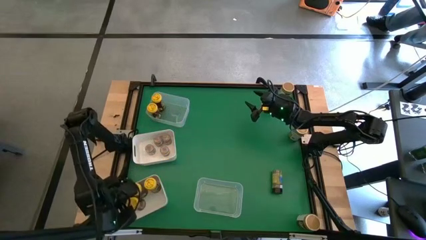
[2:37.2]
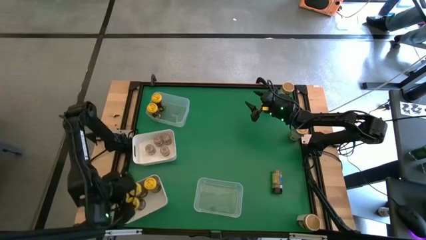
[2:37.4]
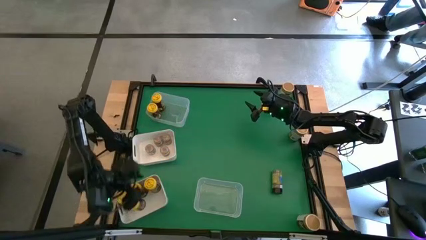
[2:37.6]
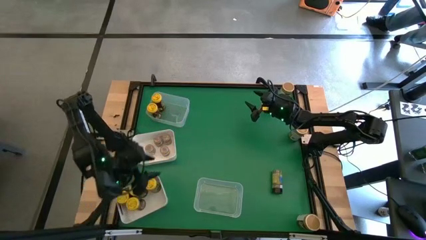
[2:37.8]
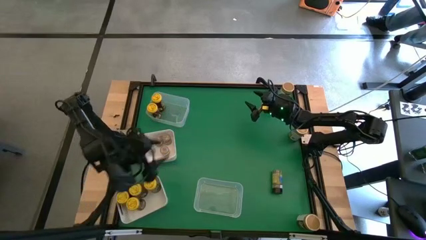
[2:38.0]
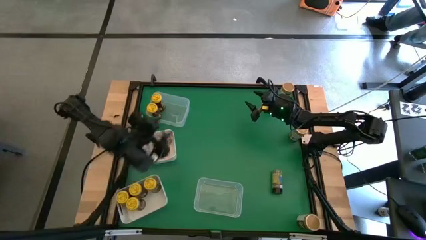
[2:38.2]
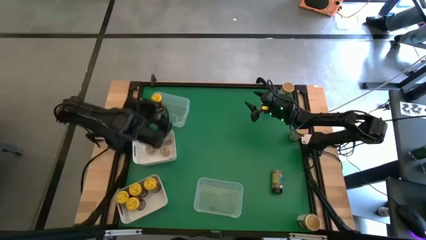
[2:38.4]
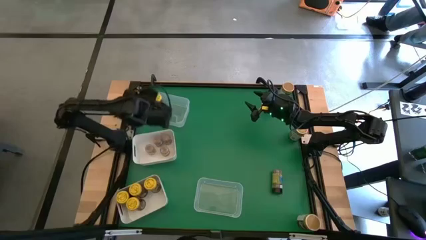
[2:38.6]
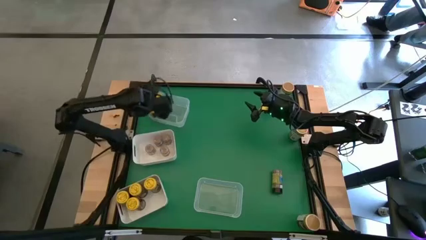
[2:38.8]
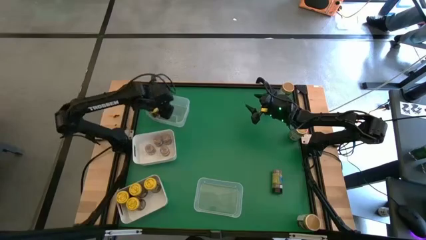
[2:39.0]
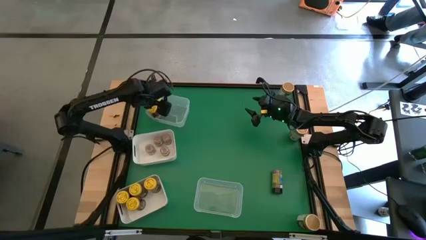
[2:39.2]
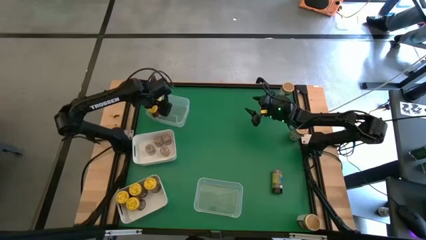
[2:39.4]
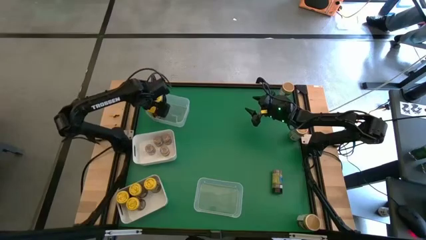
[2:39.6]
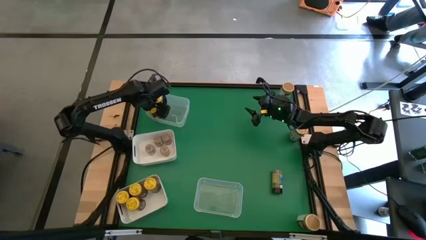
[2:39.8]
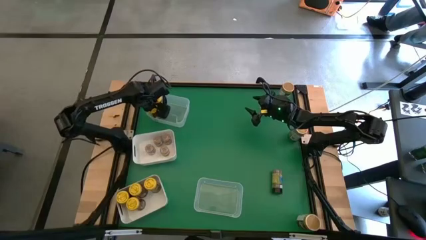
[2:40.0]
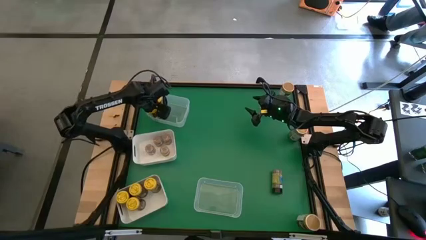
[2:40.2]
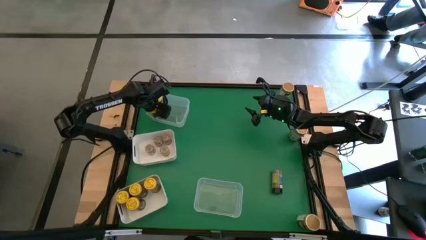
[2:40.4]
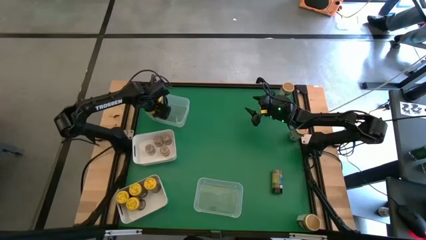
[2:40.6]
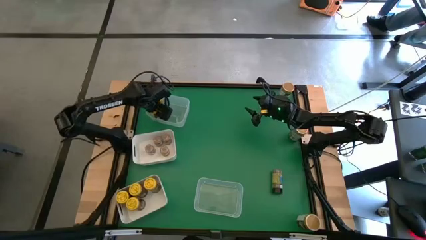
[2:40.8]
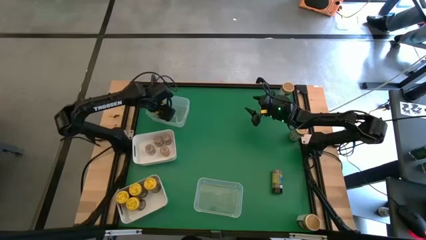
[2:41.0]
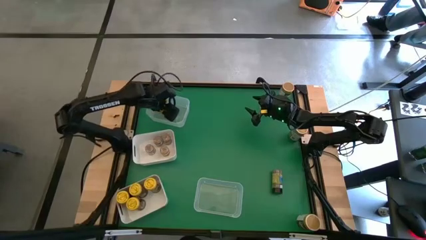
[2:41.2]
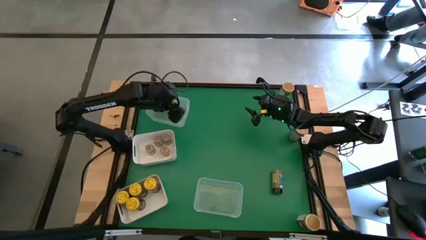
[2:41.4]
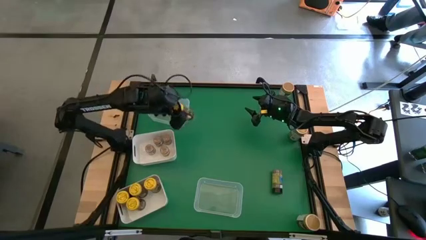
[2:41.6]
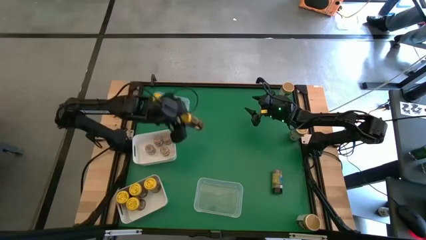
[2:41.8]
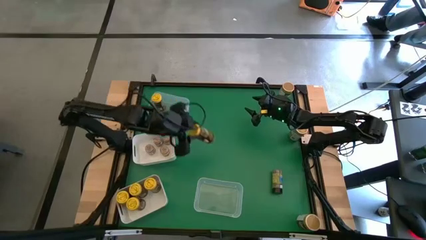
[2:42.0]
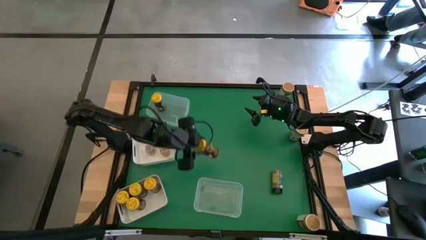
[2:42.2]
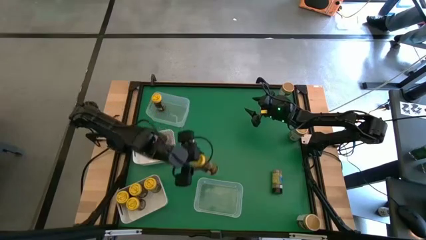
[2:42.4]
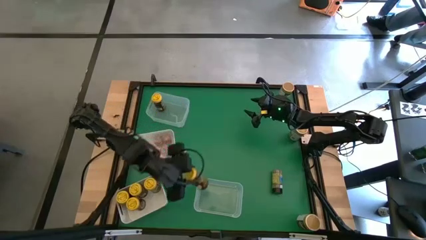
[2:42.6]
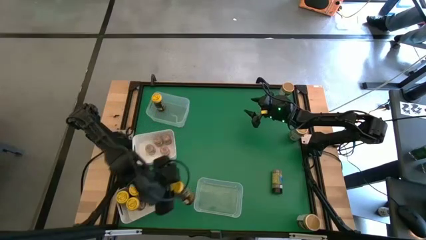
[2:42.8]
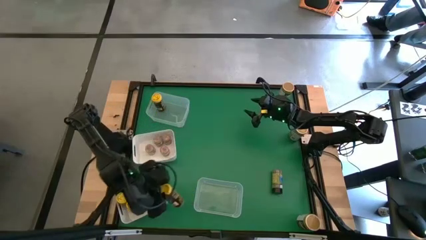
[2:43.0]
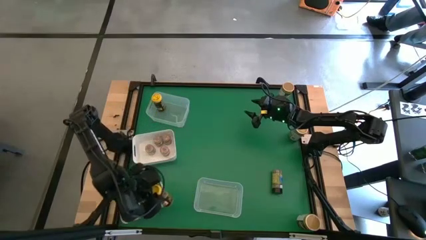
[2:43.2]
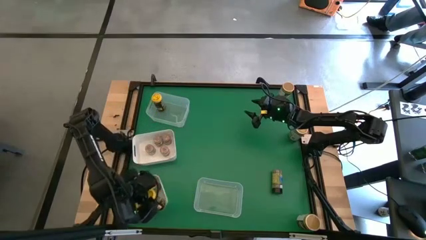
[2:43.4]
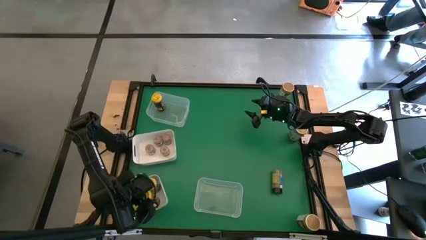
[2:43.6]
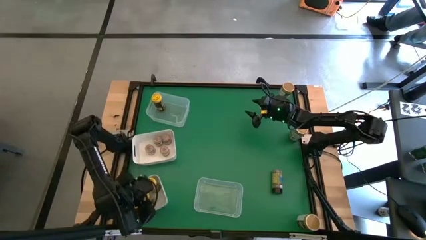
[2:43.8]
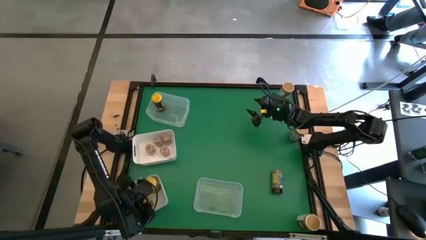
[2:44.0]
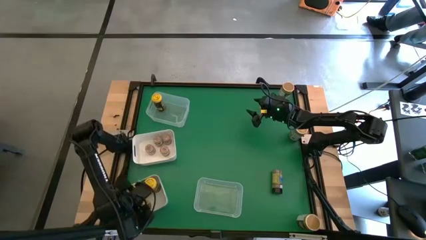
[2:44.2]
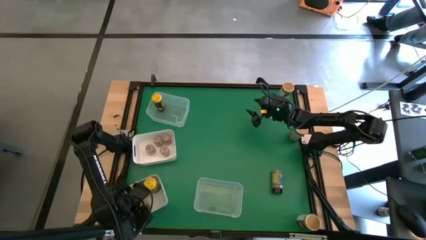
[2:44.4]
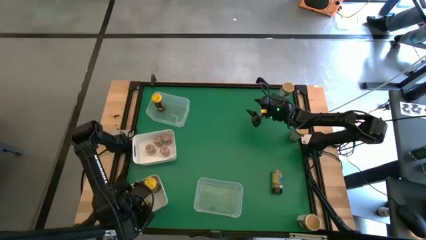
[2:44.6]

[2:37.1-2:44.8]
Task: Sort spices by type
Put the yellow spice bottle from the top transparent bin into the bottom white bin

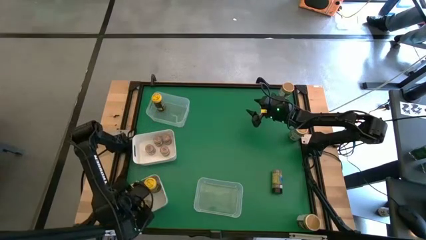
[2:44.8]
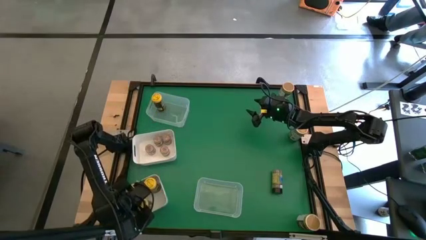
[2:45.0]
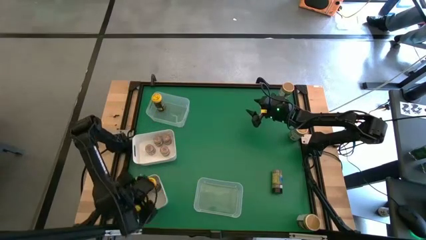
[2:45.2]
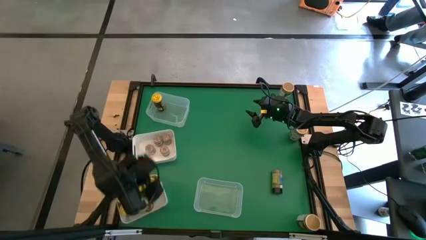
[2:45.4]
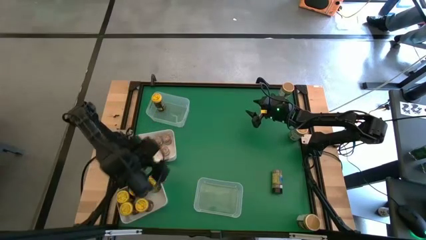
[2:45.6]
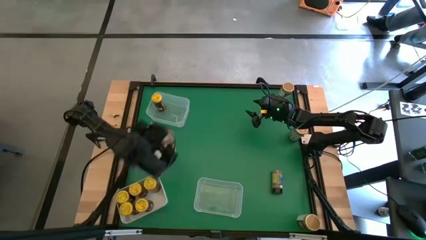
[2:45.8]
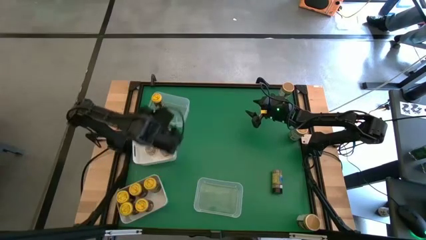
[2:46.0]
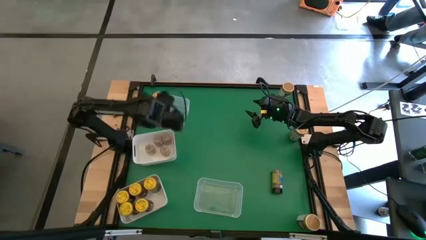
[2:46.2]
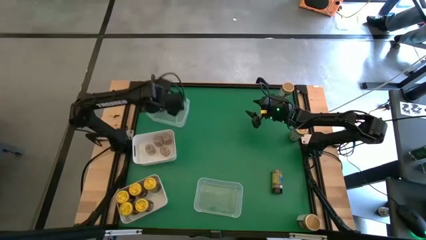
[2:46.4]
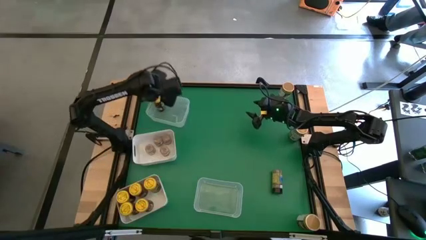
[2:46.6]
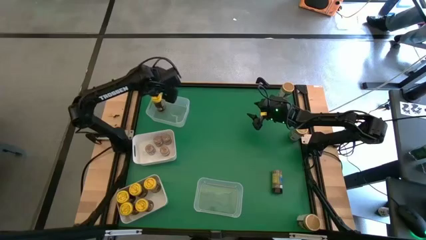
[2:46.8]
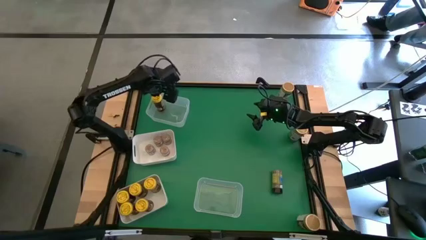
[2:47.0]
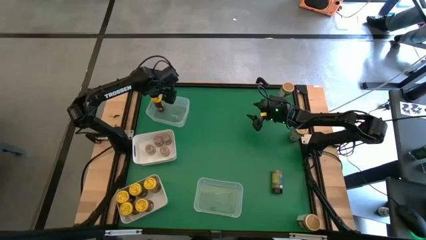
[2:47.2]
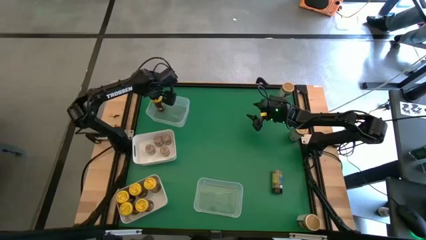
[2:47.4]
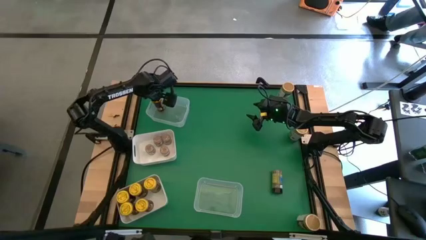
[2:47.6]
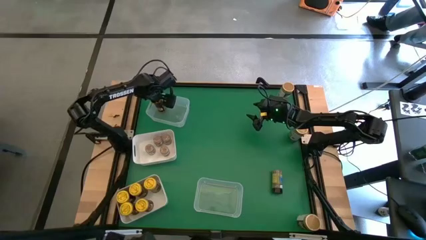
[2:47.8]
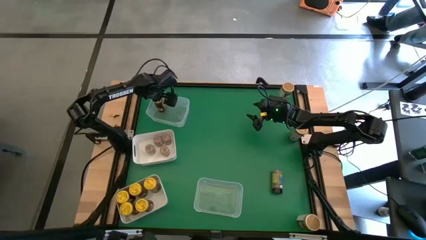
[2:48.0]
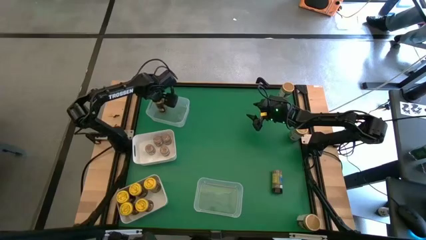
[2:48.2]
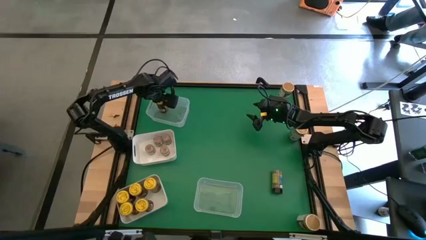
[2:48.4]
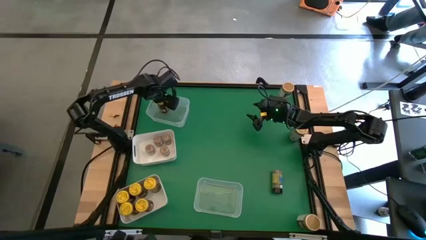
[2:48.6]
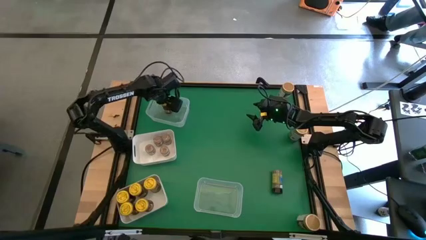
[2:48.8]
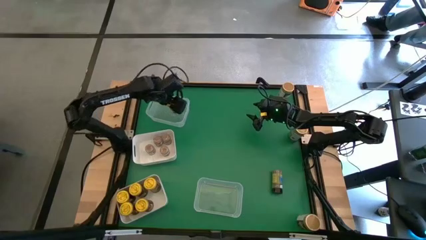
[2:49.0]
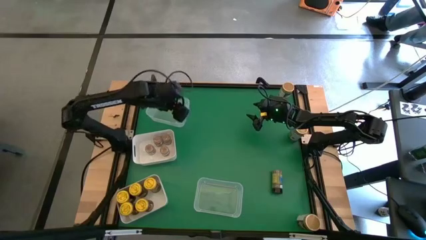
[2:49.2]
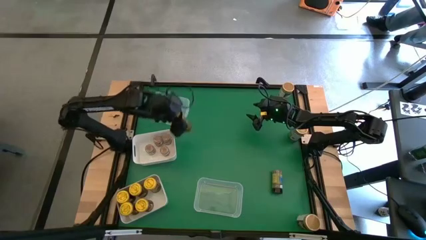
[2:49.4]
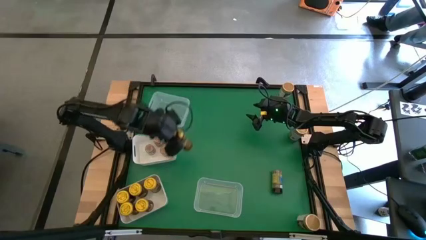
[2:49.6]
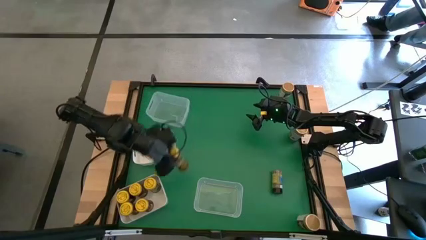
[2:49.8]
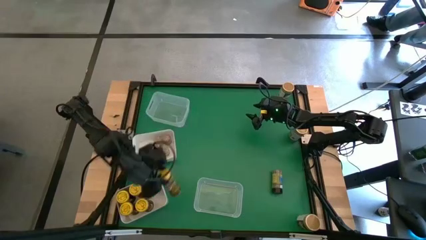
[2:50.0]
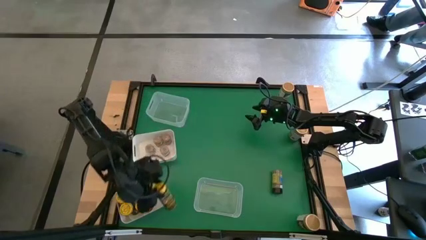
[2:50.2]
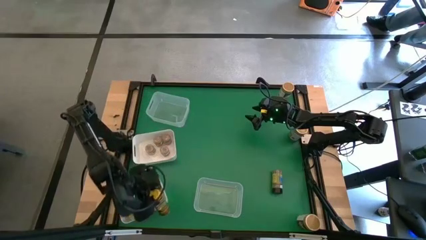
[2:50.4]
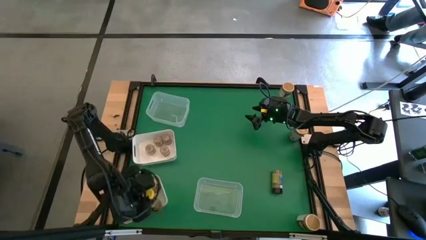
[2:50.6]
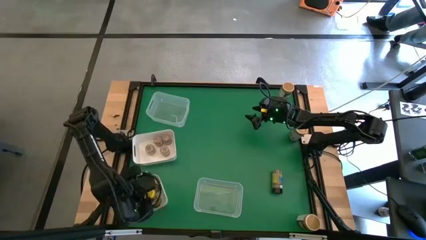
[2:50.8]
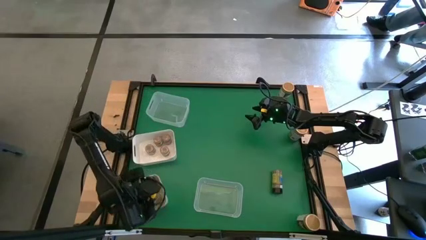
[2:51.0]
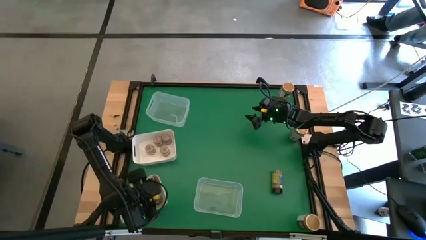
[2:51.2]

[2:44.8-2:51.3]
Put the yellow spice bottle from the top transparent bin into the bottom white bin

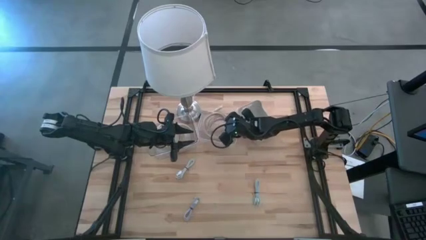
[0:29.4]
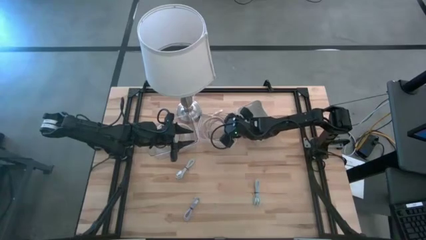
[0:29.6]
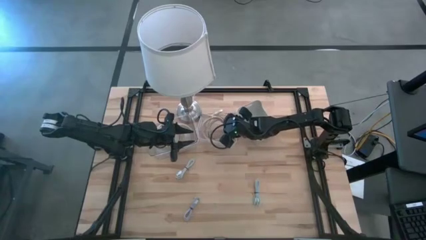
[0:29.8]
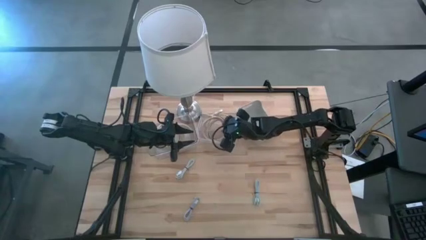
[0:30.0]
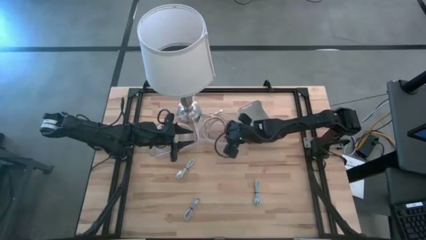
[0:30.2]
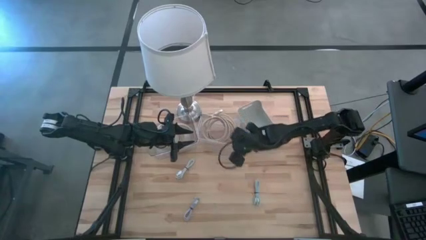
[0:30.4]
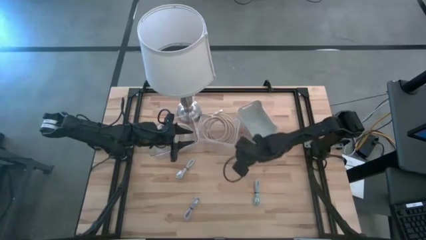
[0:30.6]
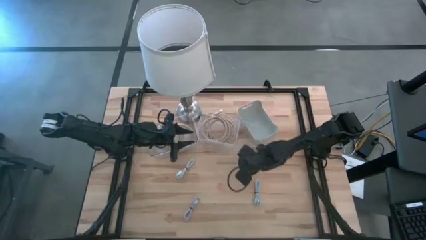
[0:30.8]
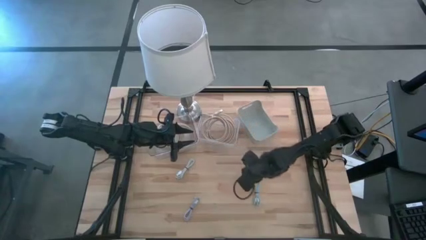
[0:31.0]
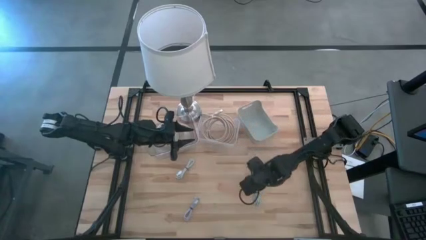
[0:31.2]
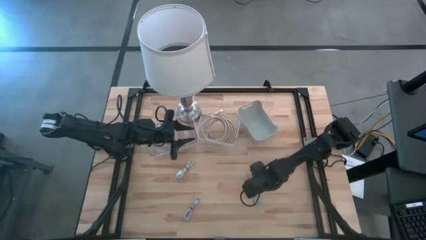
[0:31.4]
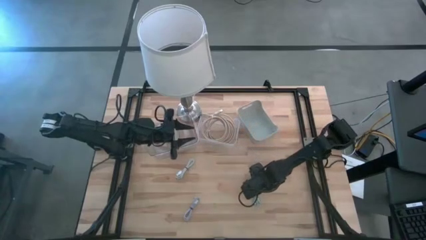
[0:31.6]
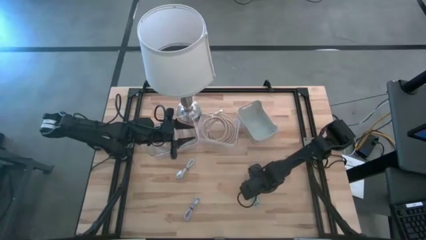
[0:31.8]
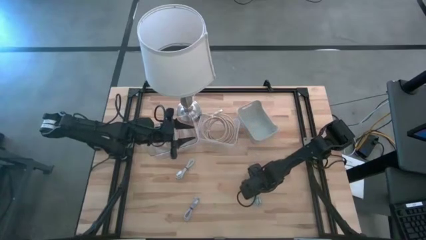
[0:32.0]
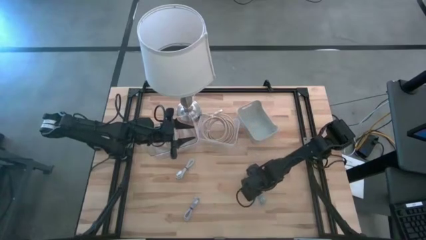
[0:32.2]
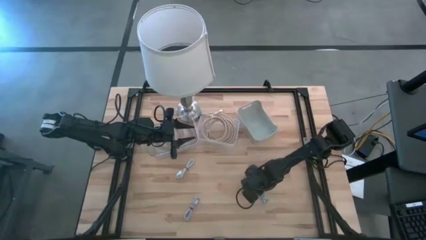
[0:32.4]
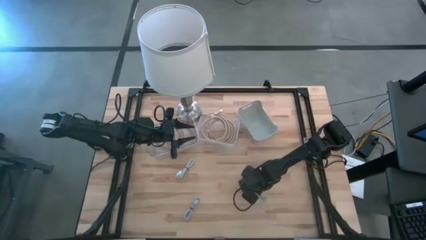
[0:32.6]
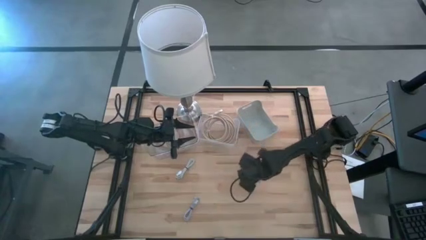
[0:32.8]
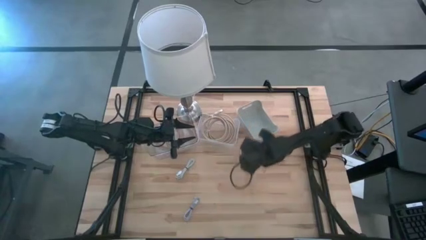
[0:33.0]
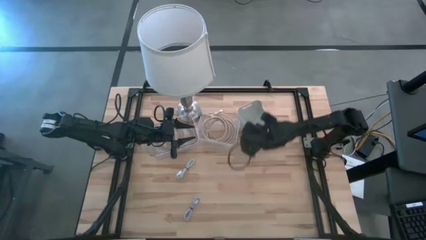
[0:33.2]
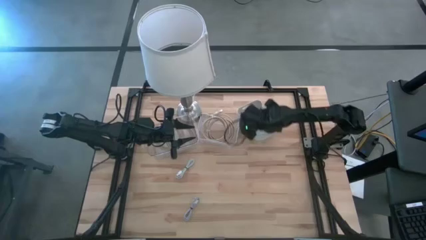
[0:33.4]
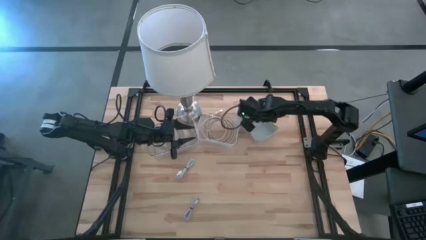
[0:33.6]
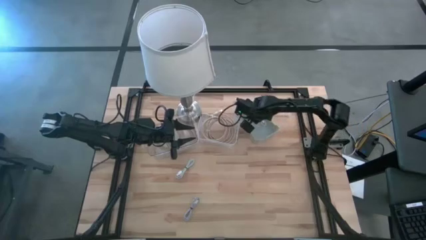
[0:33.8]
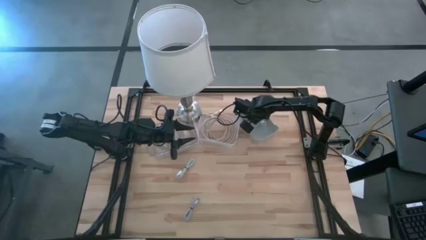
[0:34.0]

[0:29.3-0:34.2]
Task: Pick & Place USB Port
Put the blue USB cable into the gray bin
